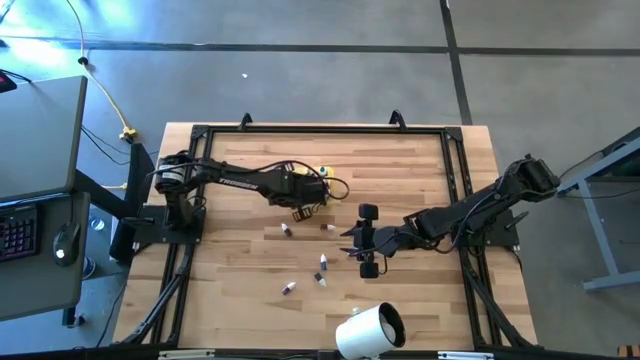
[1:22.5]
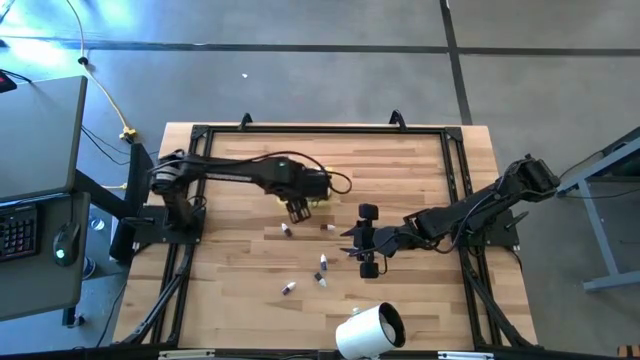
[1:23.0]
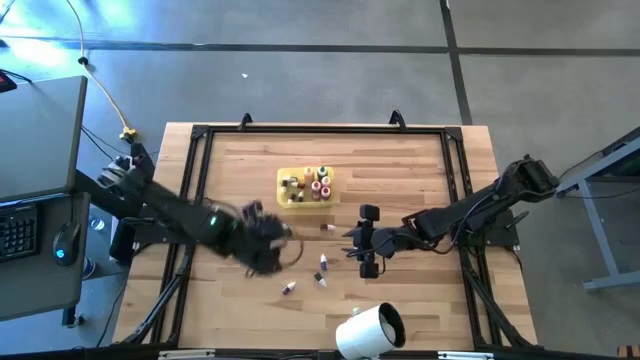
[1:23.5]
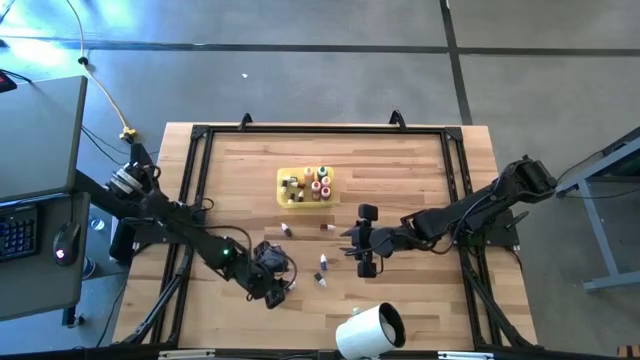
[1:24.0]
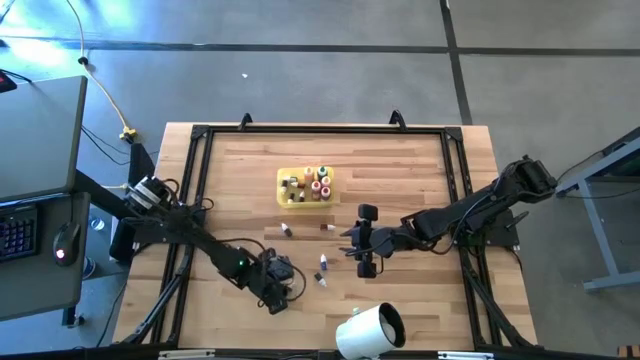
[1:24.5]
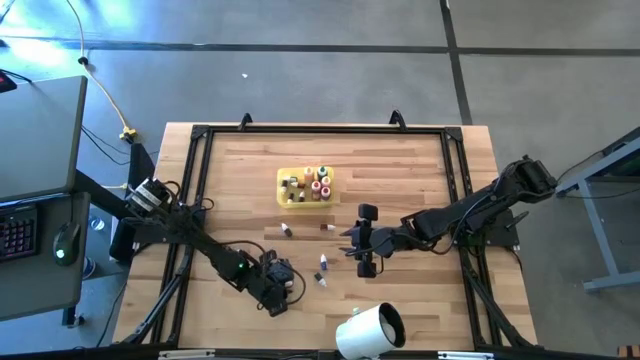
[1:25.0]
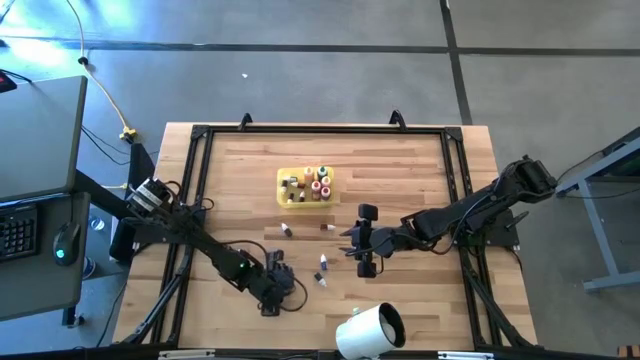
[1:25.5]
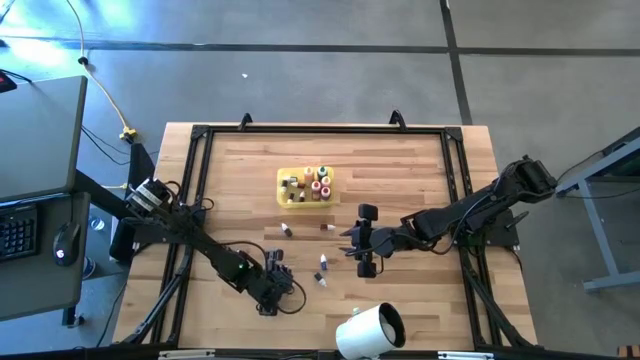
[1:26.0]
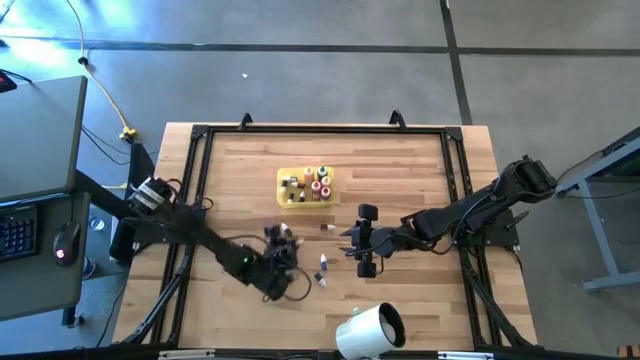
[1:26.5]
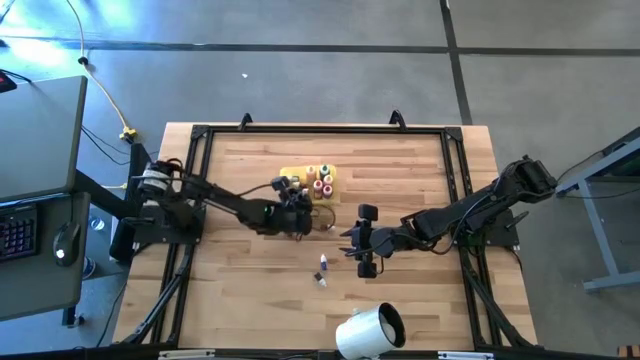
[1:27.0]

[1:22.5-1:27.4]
Task: Pick & Place food coloring
Put the bottom small red food coloring bottle into the yellow container

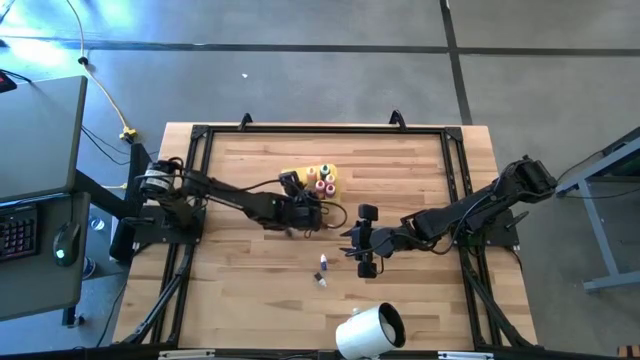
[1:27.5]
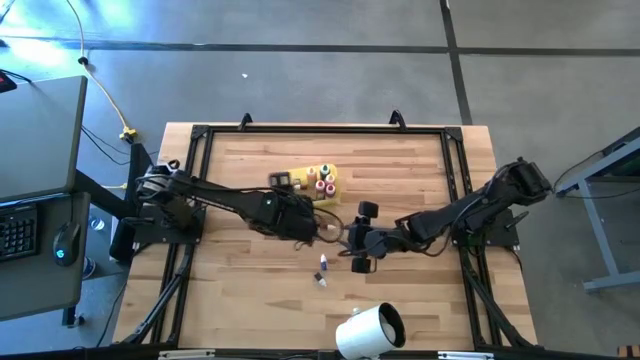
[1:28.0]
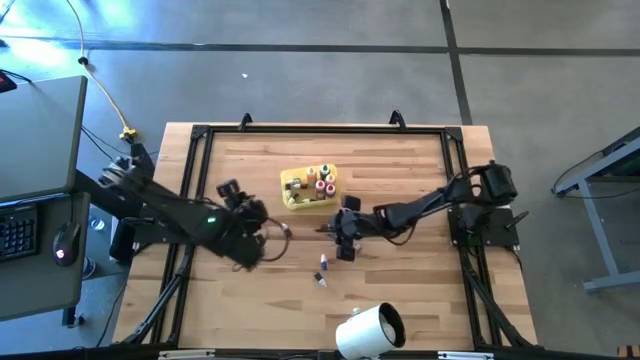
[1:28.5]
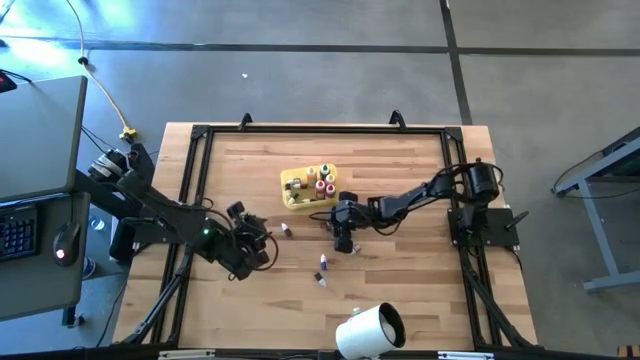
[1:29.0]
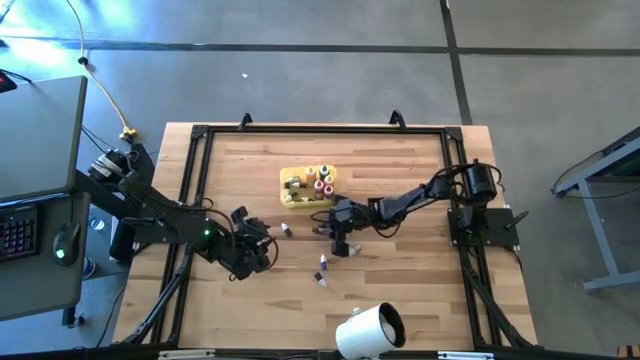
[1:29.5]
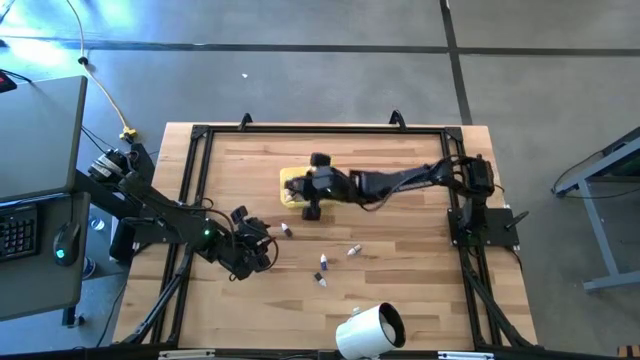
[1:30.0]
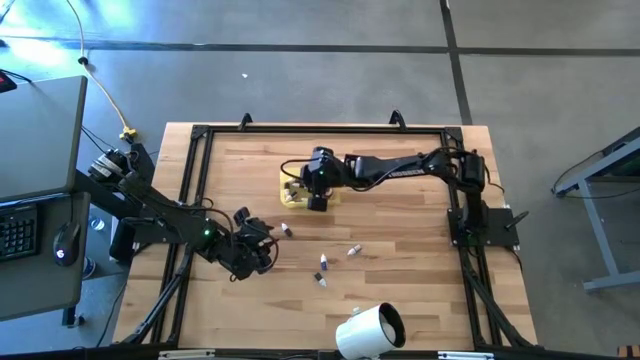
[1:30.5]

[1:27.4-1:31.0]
Put the small red food coloring bottle into the yellow container

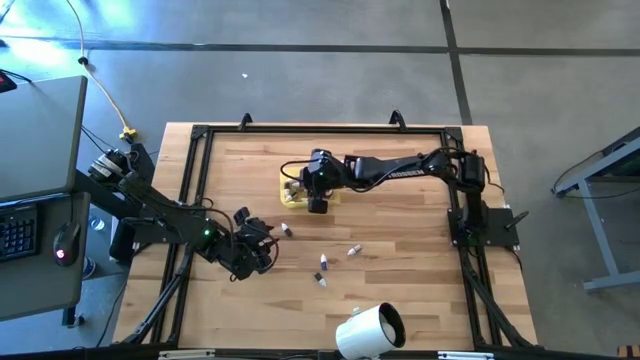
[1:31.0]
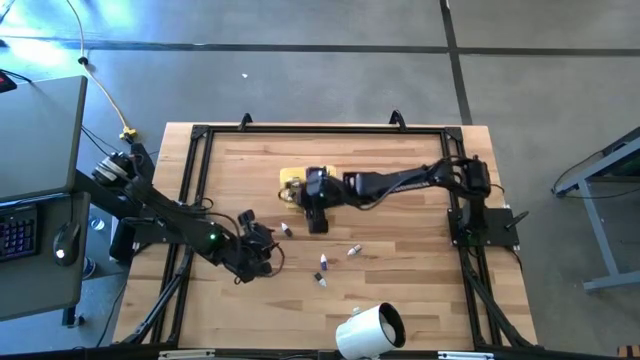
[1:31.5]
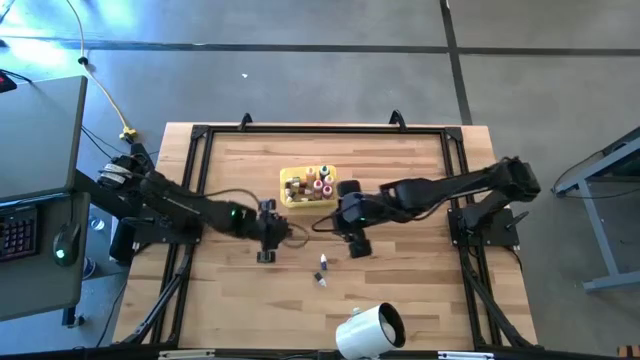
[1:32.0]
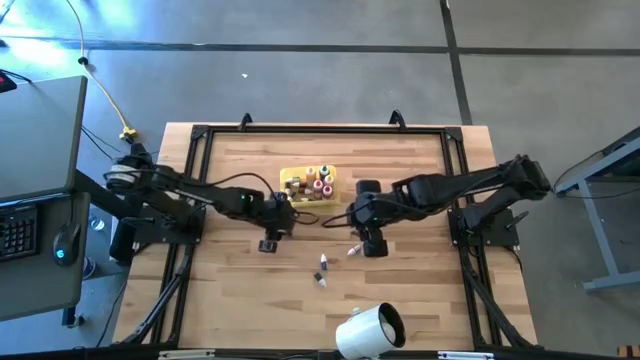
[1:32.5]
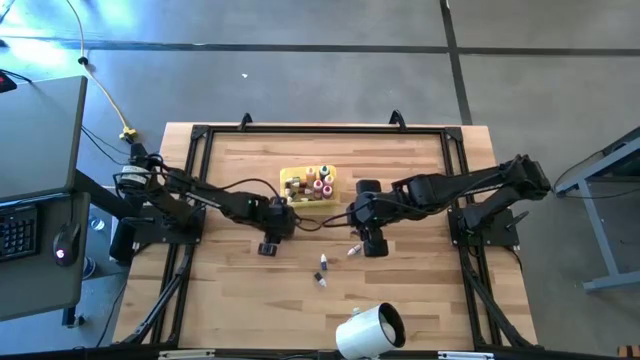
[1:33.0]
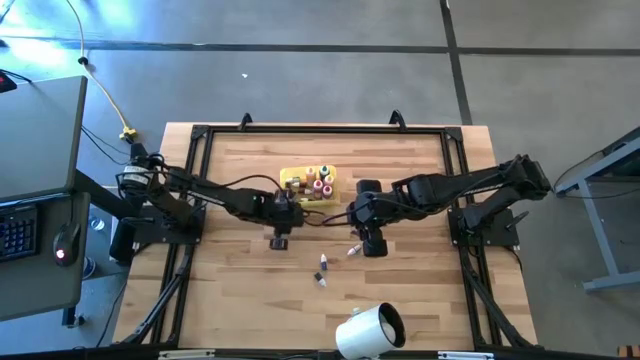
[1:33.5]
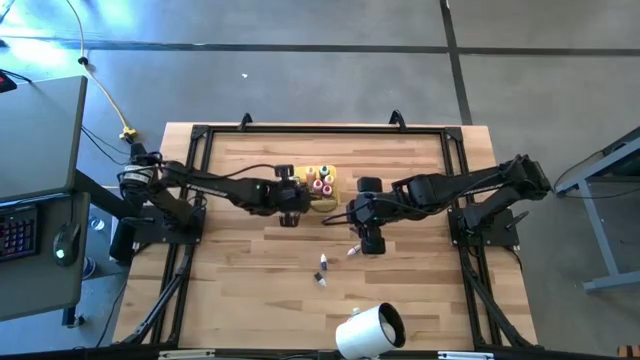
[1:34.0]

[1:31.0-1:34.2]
Put the top small green food coloring bottle into the yellow container

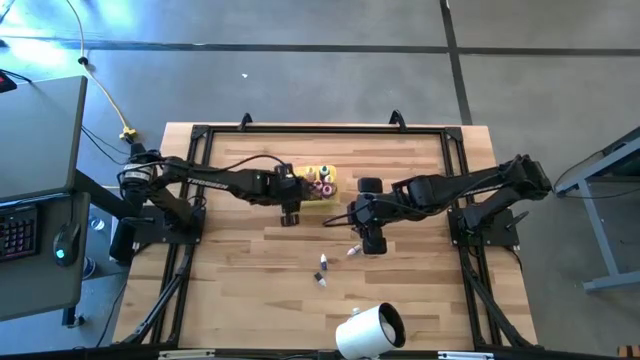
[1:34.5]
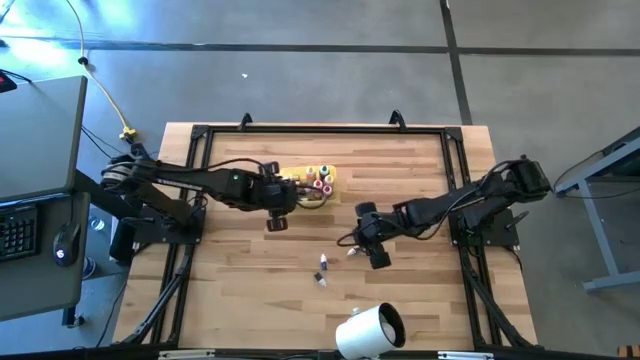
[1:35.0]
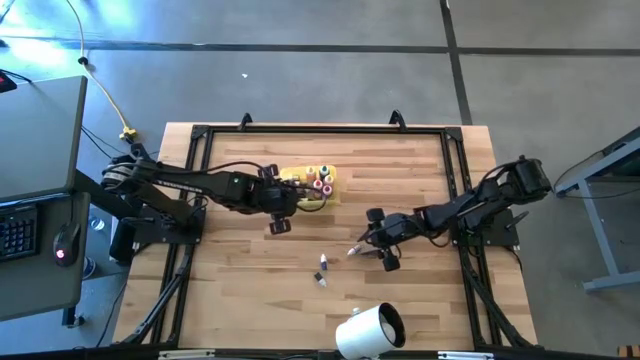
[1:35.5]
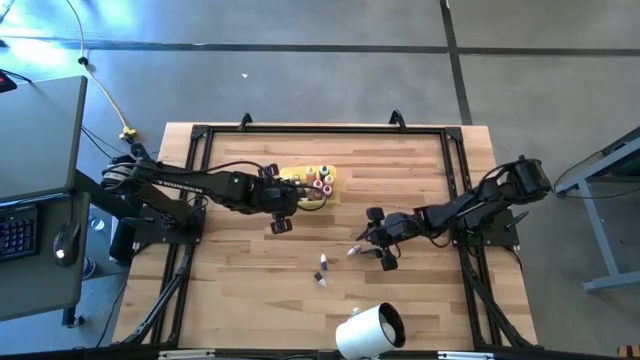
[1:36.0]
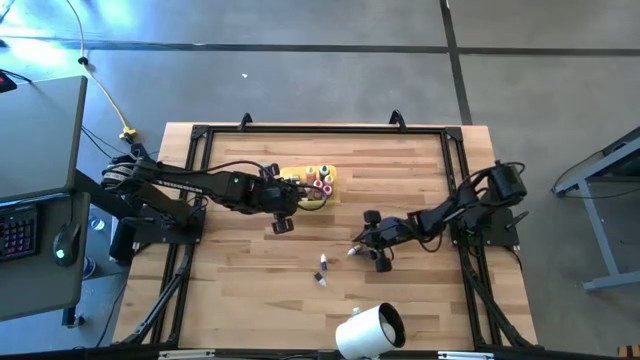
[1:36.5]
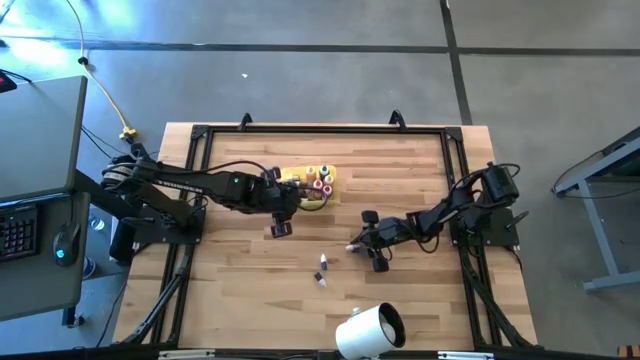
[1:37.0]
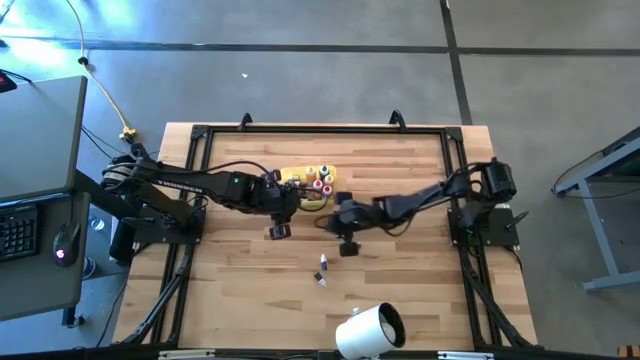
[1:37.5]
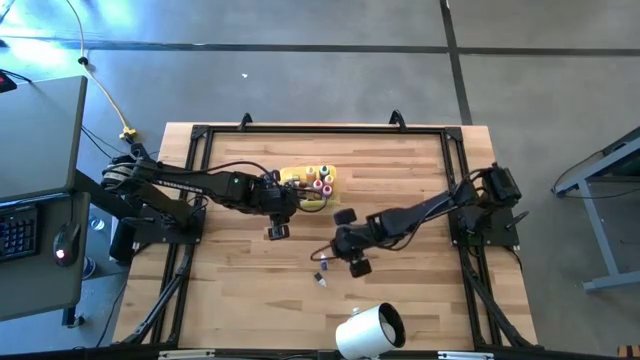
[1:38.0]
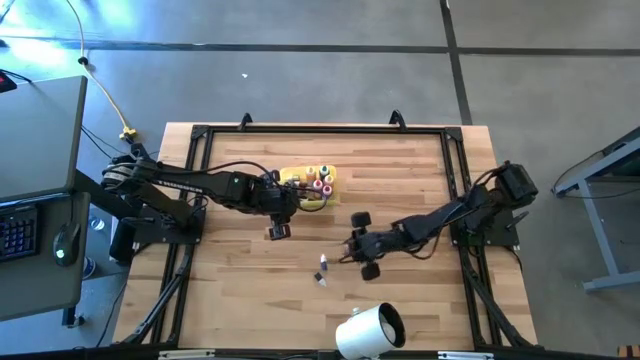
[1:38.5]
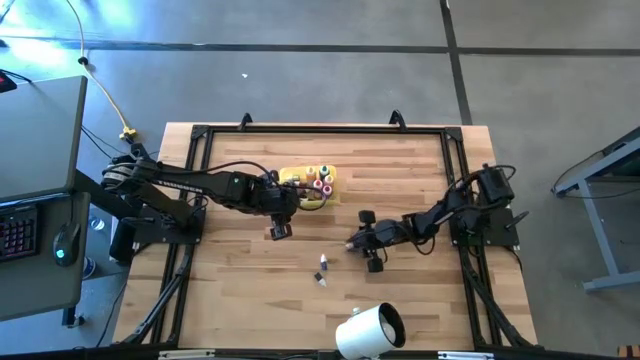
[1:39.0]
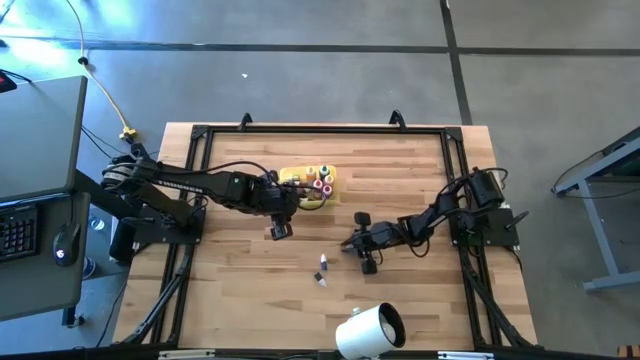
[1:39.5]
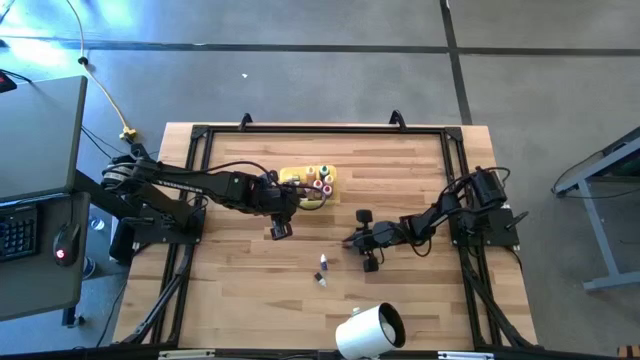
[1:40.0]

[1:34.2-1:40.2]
Put the small purple food coloring bottle into the yellow container

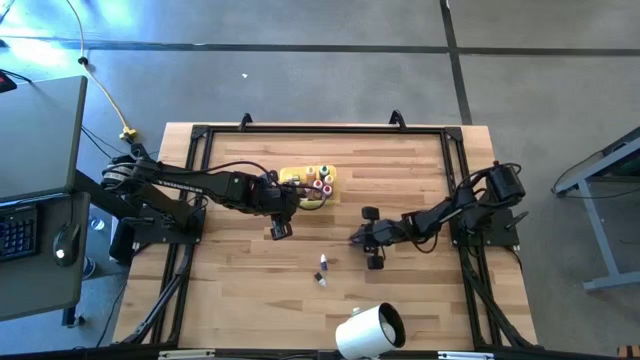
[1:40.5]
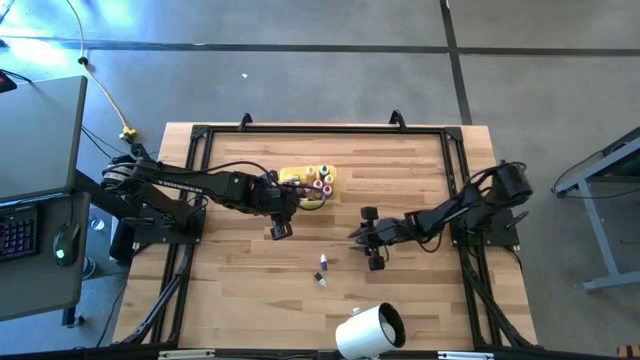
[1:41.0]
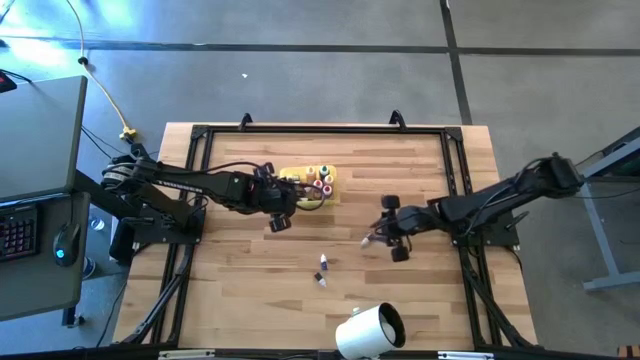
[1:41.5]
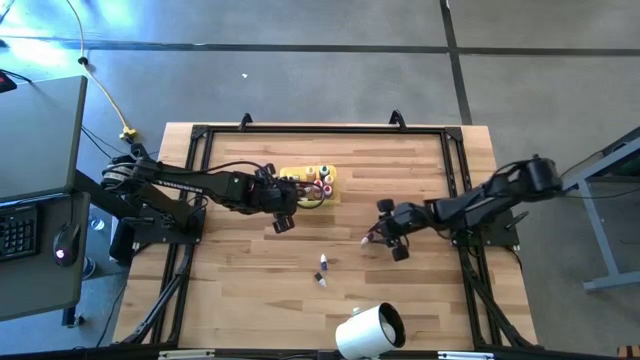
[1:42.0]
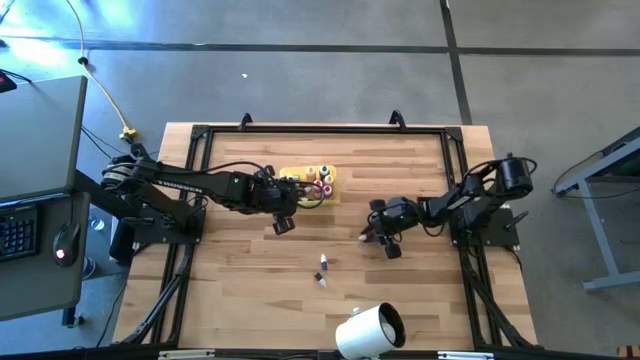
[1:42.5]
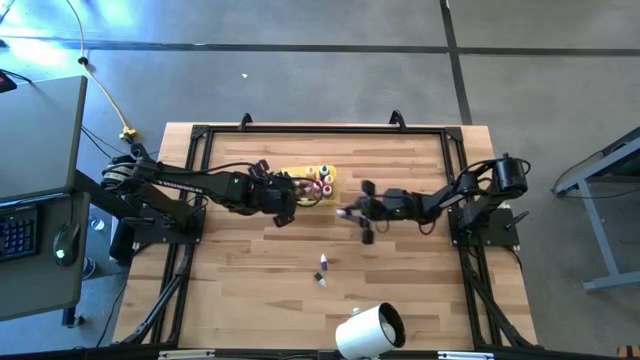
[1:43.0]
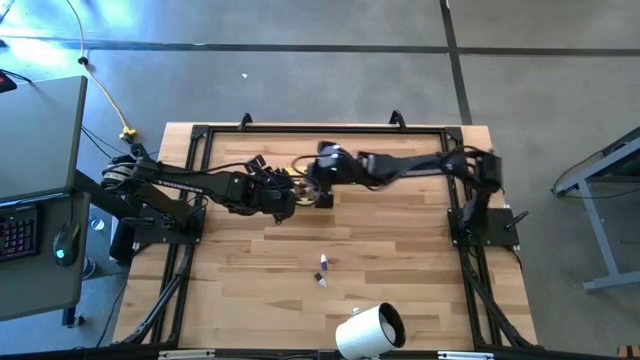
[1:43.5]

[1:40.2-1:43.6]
Put the small purple food coloring bottle into the yellow container
